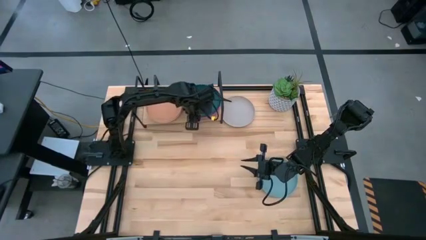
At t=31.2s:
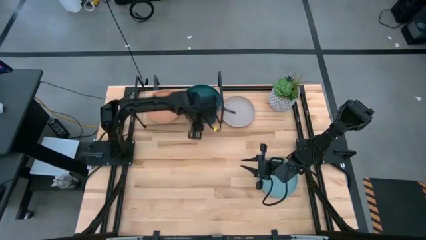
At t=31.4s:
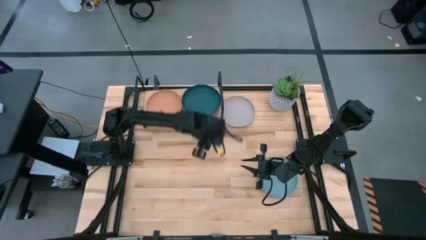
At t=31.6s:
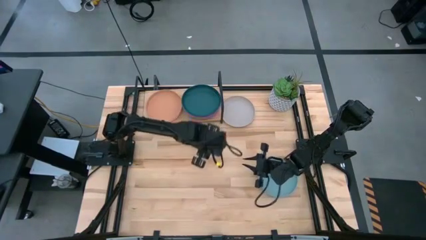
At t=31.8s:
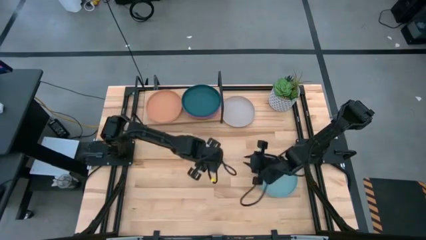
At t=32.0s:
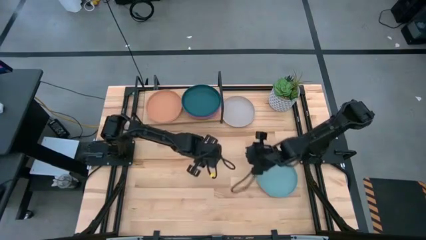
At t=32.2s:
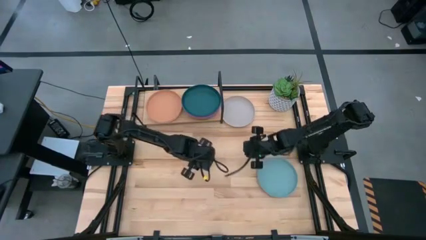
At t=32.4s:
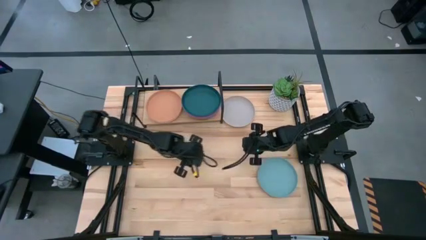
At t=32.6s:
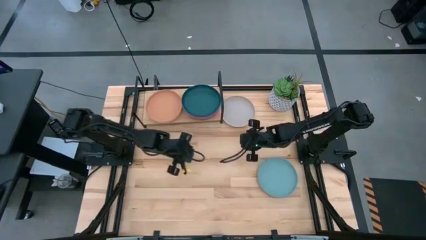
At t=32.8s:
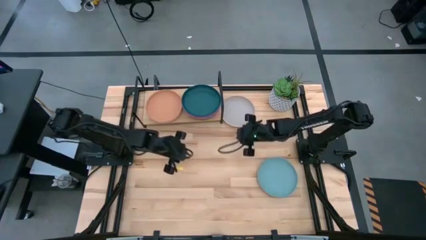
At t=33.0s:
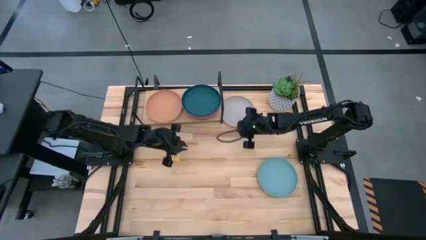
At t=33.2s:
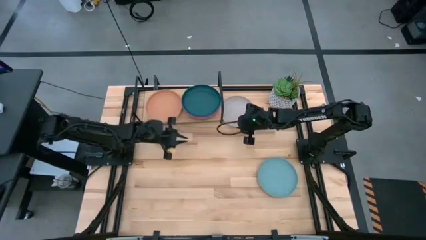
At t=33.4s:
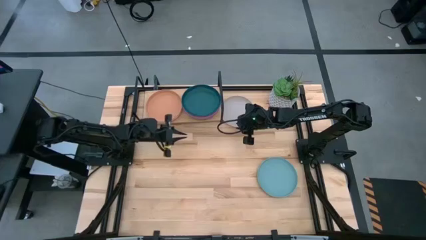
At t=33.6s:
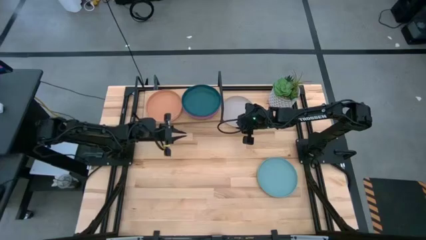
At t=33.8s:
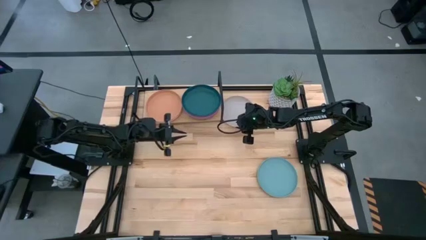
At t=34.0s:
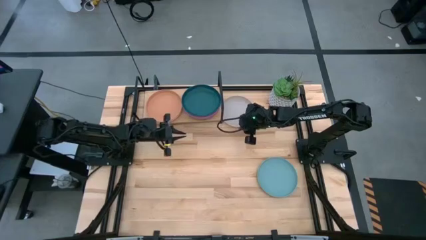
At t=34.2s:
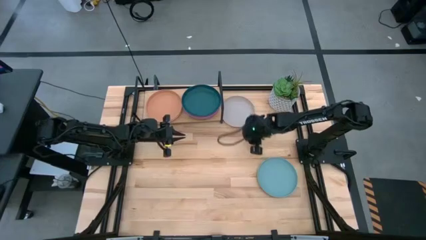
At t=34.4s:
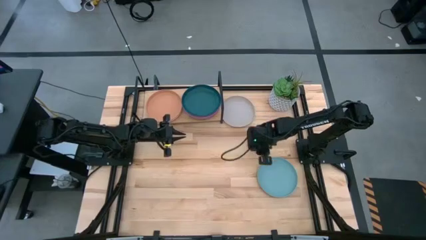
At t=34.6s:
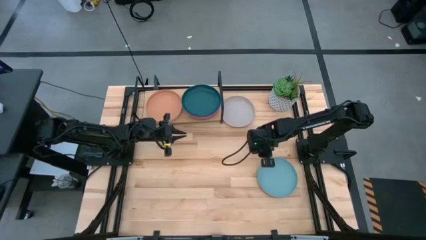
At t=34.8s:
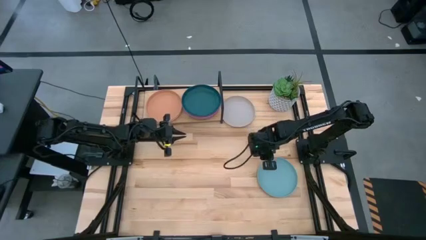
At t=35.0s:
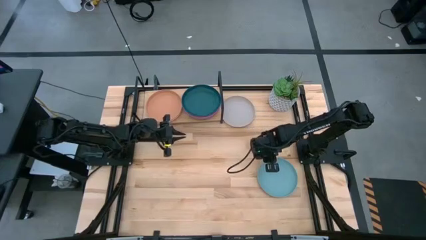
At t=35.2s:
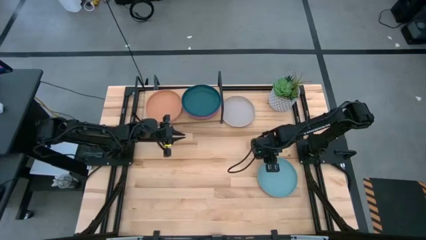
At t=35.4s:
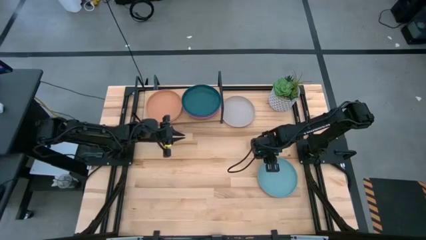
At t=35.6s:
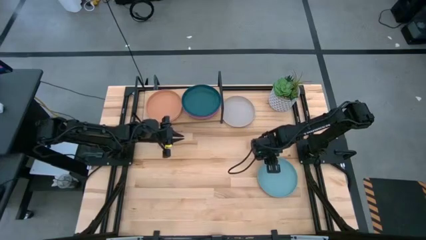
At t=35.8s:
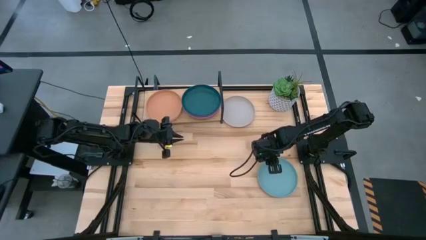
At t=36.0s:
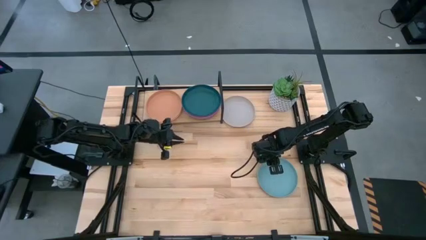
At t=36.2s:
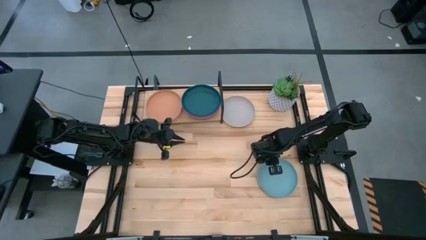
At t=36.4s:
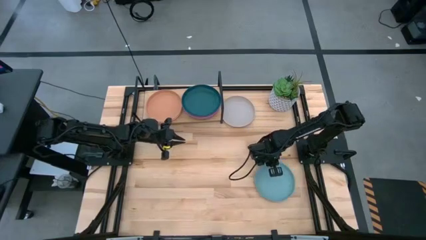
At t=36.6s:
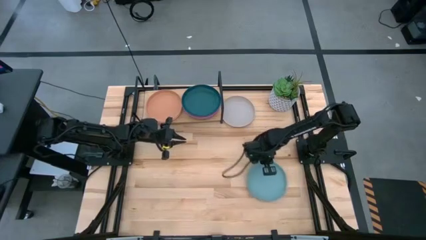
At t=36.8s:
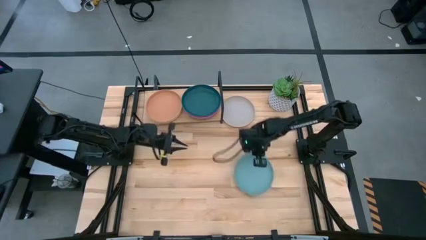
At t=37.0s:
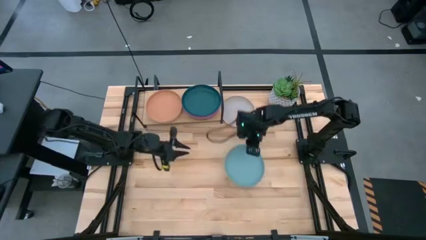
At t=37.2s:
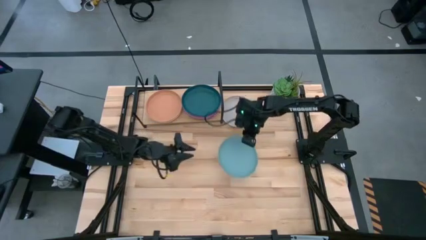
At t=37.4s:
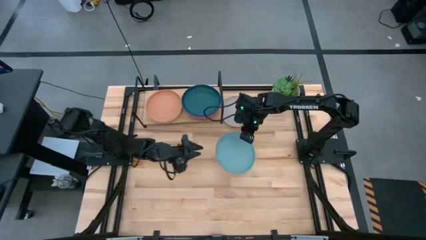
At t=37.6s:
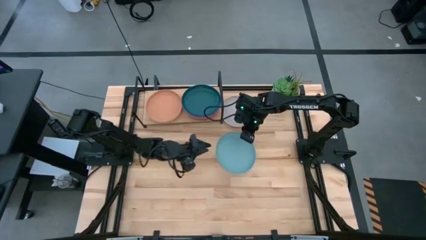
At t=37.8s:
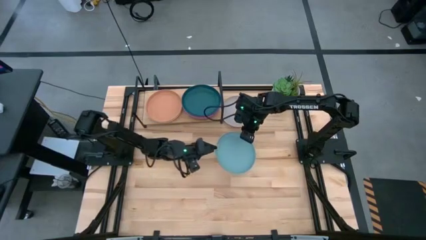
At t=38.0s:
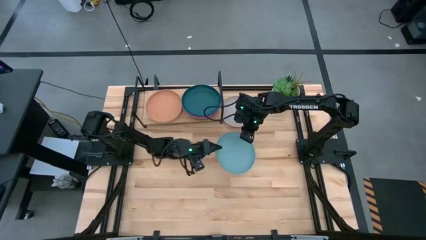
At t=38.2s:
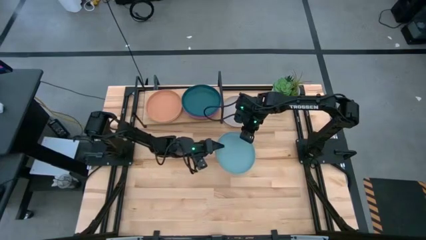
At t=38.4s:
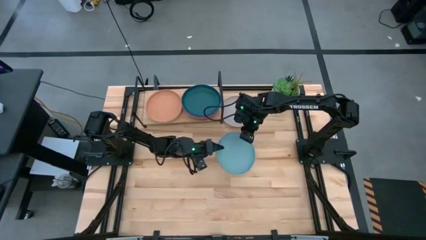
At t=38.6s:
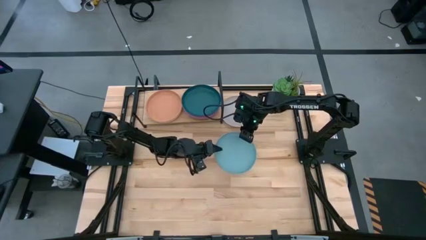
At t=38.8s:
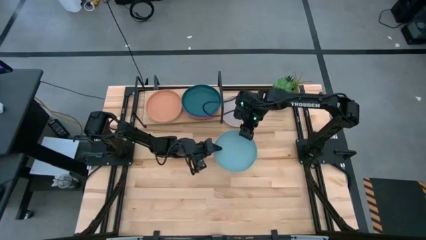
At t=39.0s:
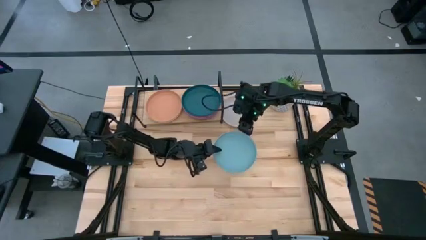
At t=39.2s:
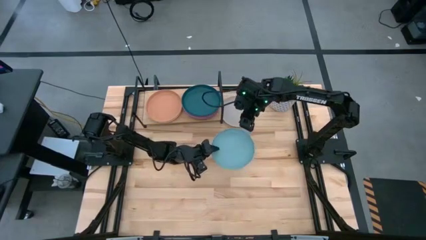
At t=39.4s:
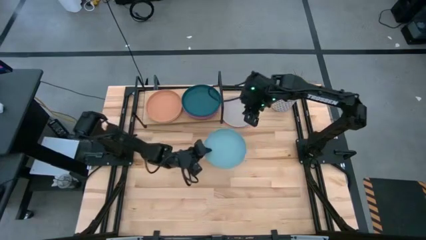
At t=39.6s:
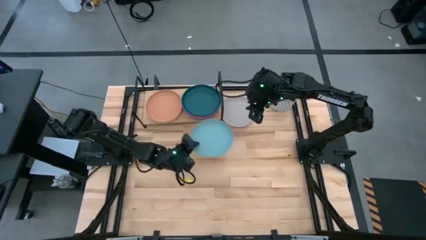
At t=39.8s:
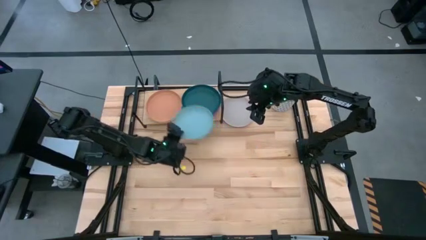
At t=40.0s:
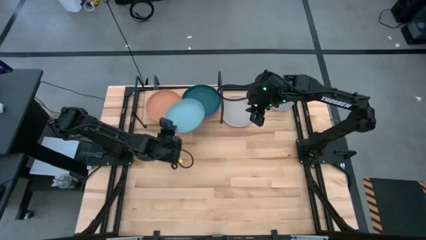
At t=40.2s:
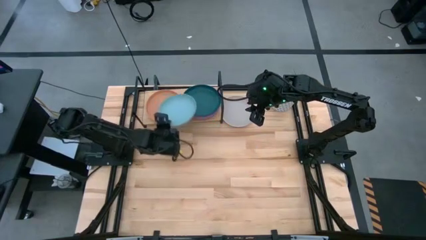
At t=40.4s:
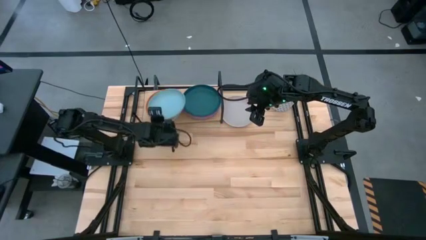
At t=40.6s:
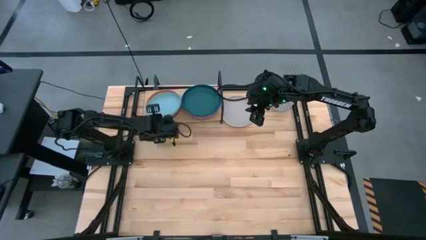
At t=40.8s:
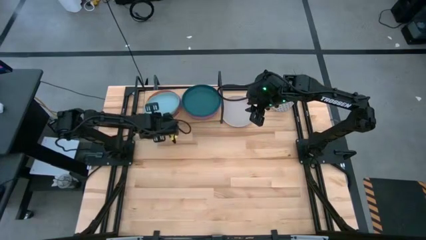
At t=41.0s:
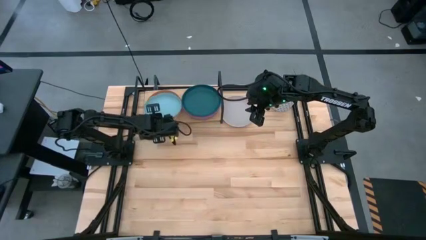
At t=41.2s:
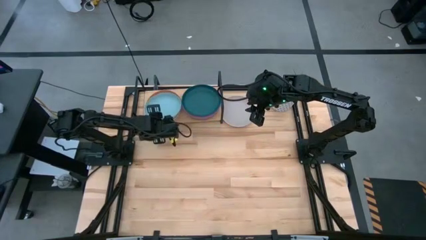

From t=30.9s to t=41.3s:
Task: Place and stack plates onto a shelf
Stack the light blue plate on top of the brown plate

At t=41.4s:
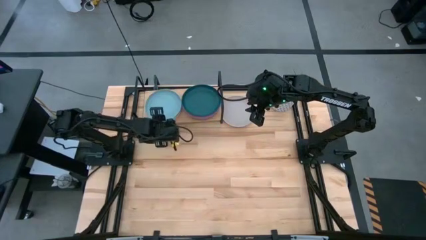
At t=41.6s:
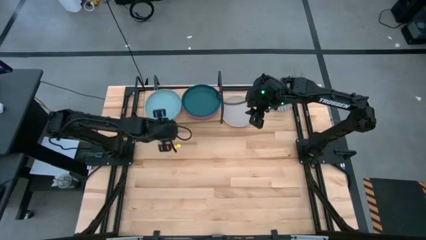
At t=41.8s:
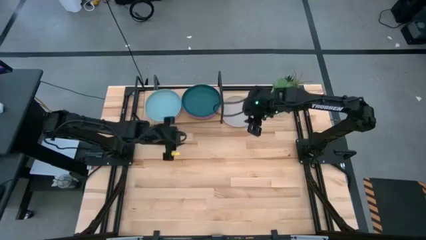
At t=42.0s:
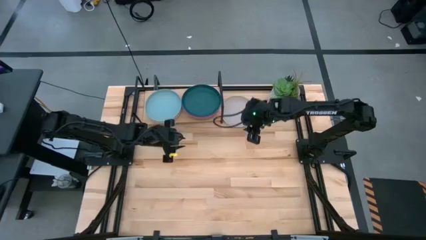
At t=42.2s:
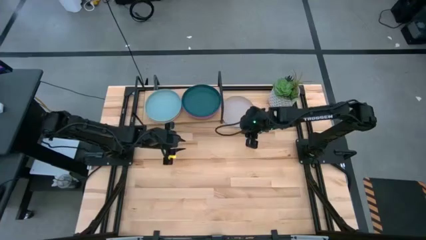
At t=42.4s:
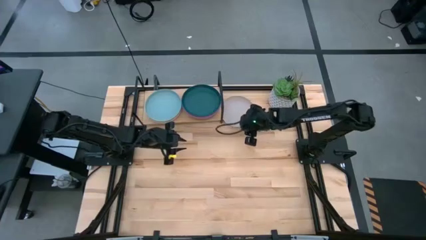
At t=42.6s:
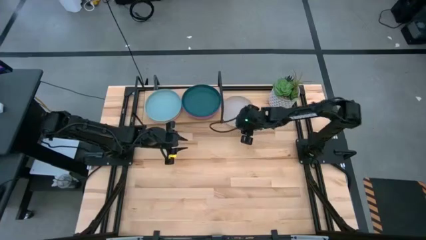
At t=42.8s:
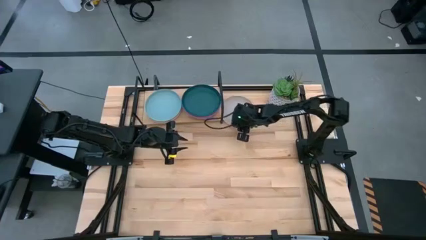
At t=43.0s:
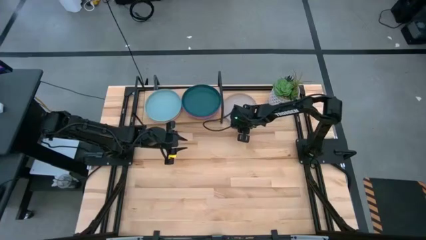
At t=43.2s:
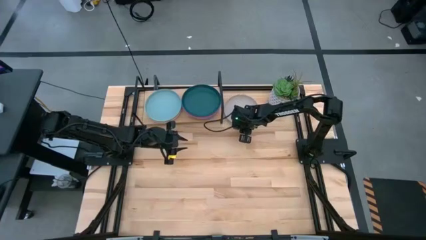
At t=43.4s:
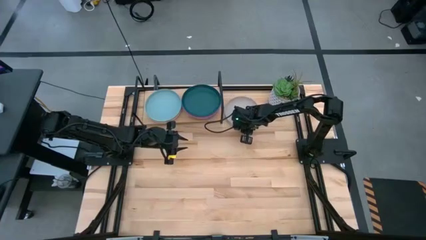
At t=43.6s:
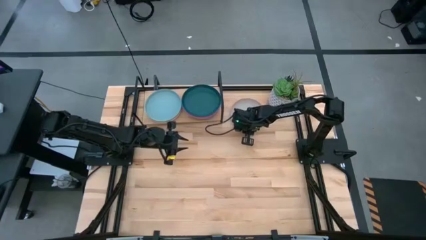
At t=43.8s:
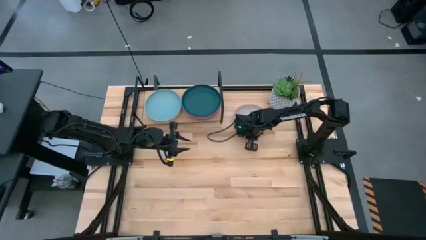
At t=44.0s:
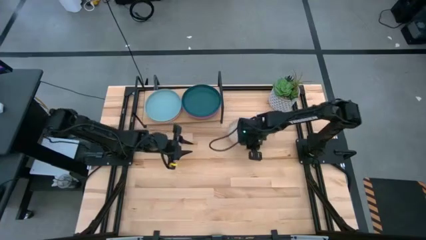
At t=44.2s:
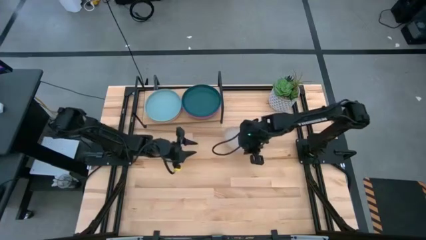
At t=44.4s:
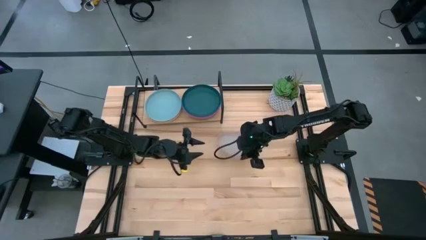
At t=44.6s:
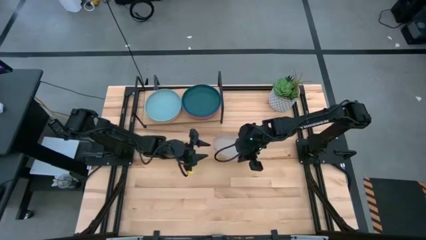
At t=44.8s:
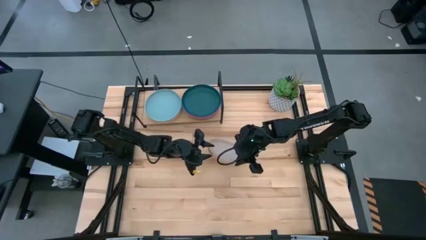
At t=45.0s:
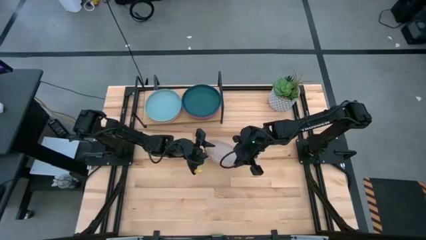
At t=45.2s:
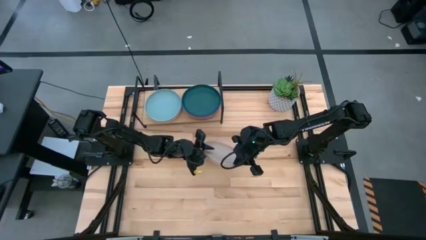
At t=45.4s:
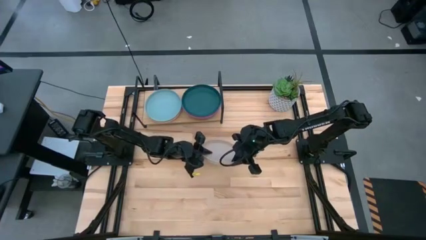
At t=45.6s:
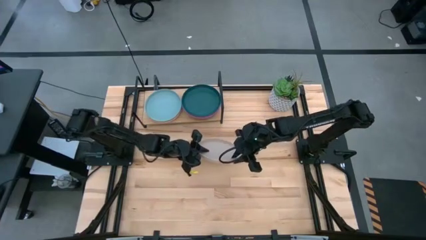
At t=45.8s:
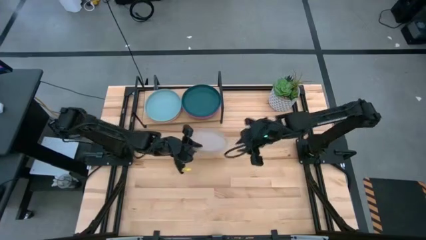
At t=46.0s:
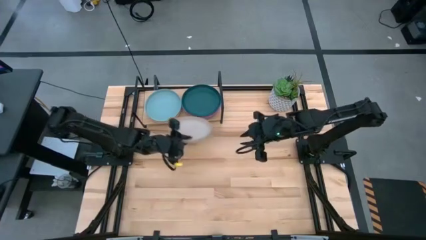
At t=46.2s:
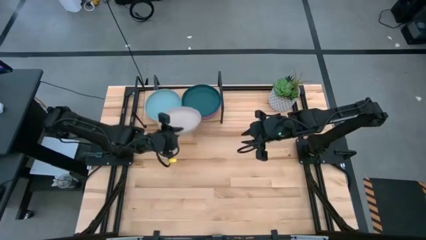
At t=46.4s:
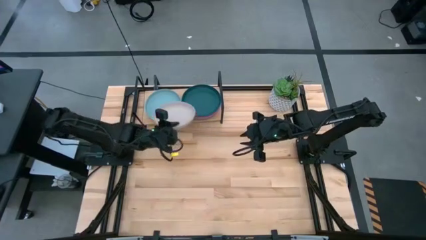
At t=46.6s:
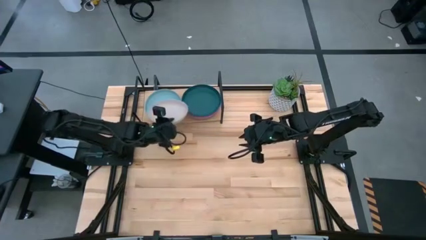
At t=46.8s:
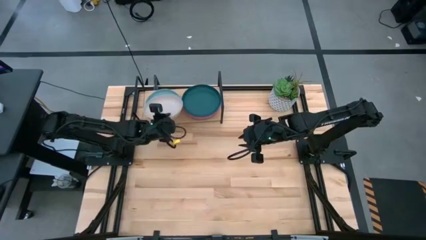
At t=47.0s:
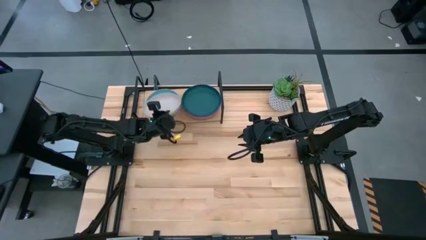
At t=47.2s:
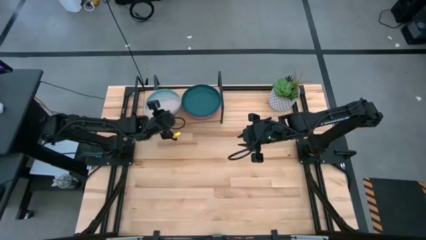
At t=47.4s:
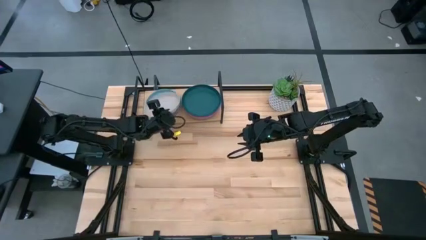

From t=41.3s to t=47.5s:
Stack the gray plate on top of the light blue plate
